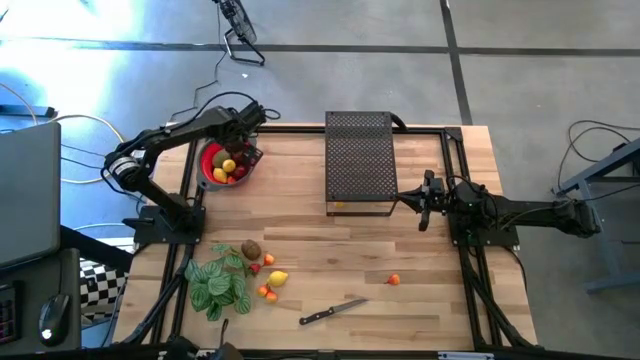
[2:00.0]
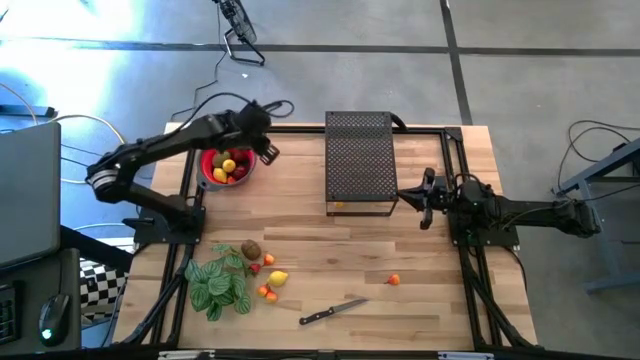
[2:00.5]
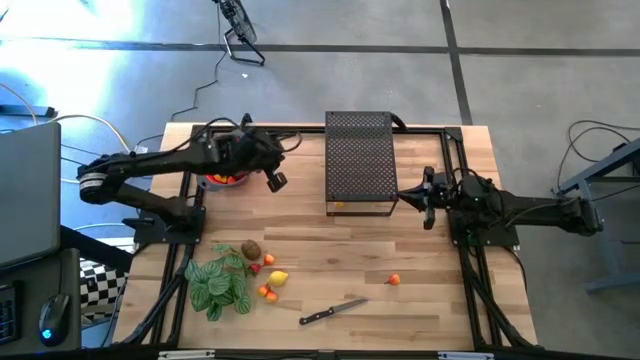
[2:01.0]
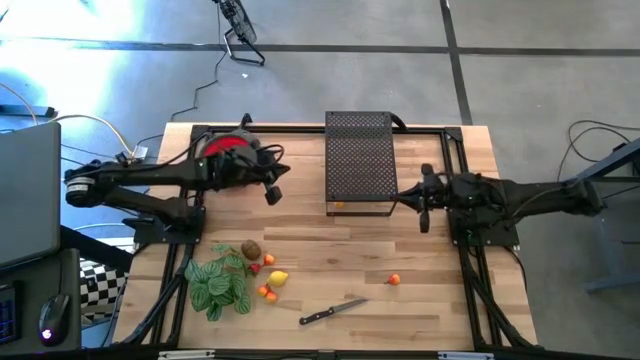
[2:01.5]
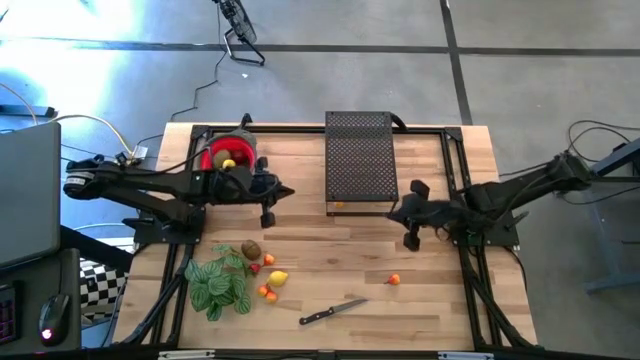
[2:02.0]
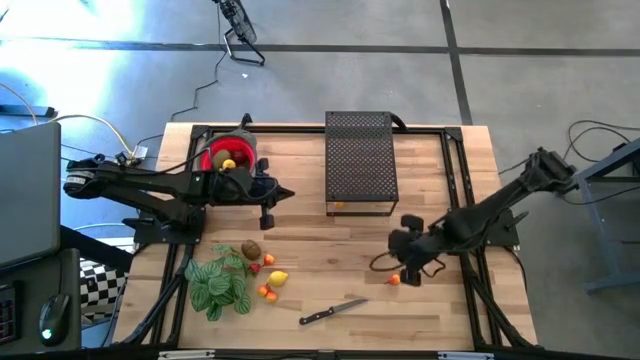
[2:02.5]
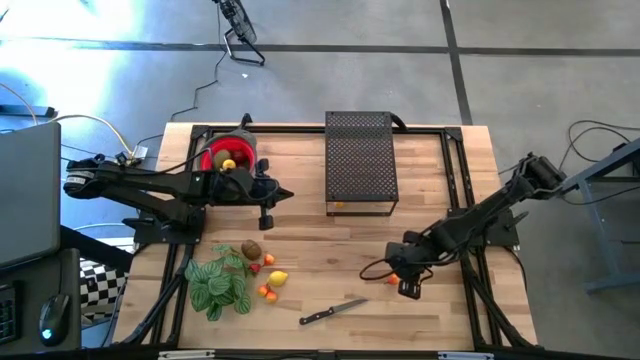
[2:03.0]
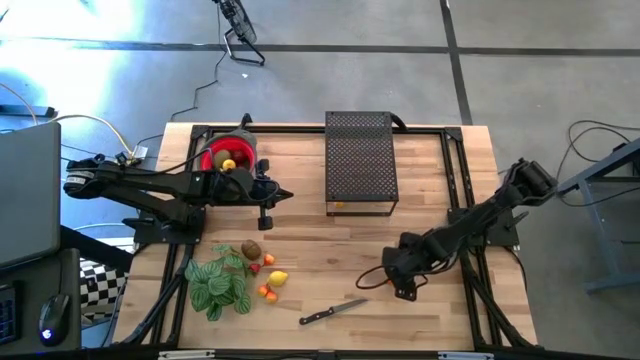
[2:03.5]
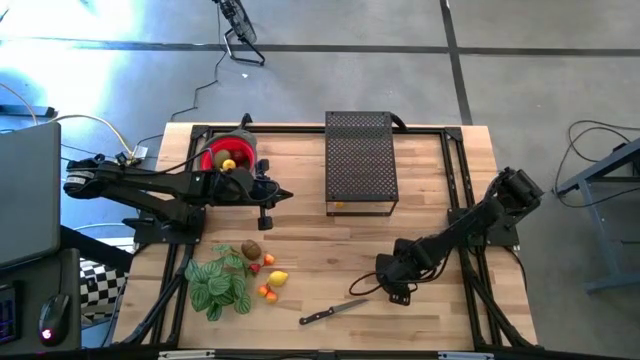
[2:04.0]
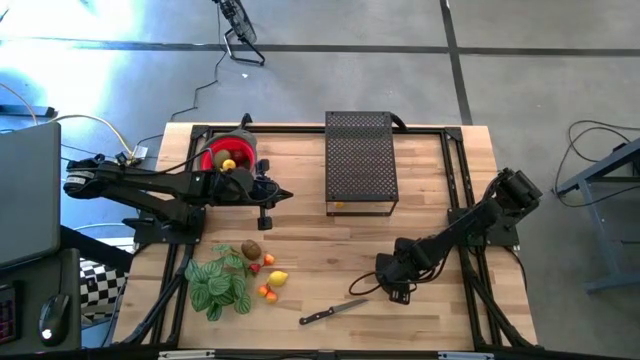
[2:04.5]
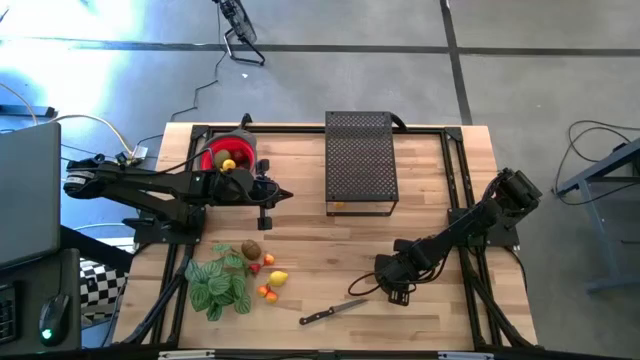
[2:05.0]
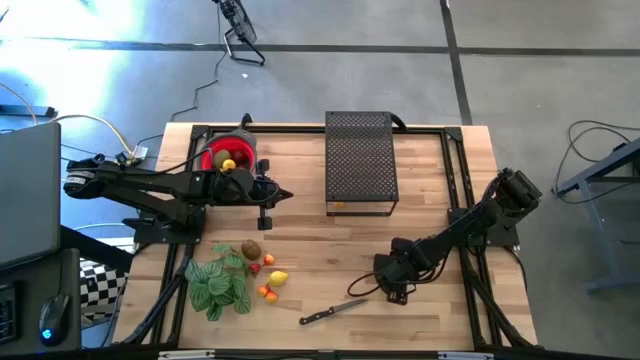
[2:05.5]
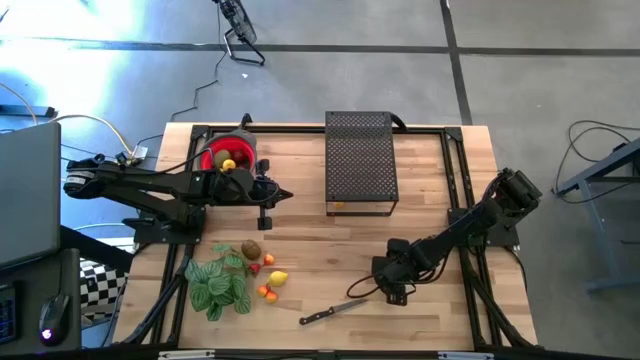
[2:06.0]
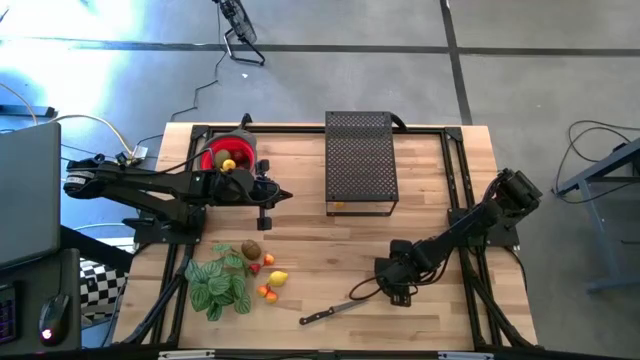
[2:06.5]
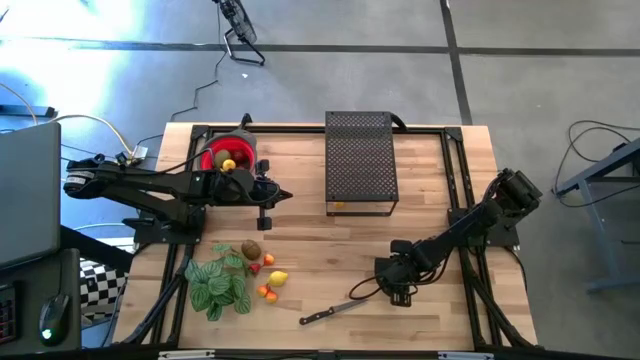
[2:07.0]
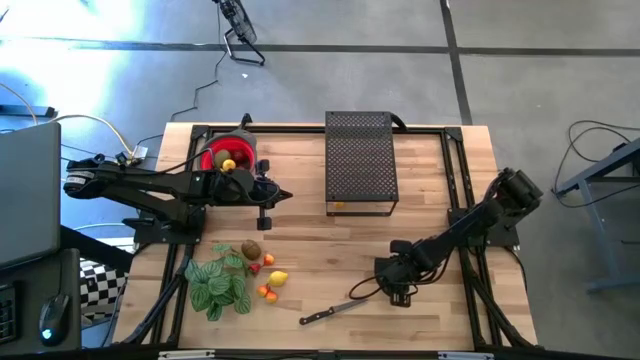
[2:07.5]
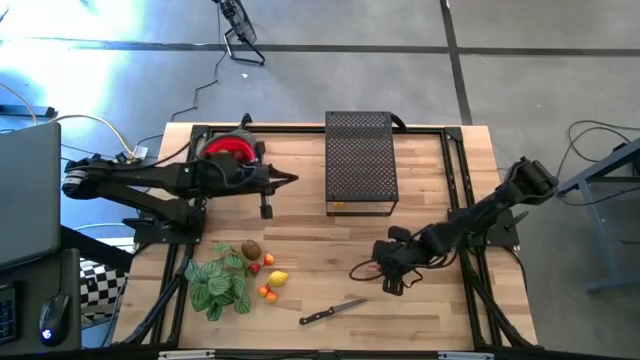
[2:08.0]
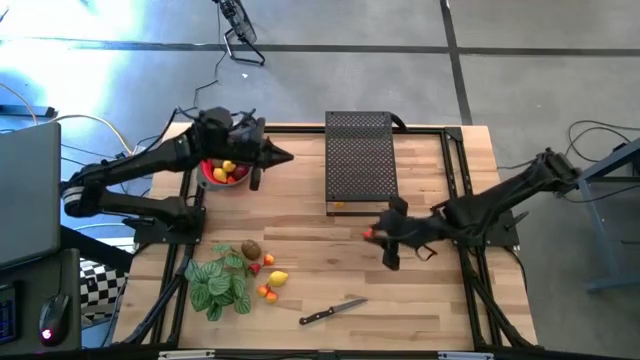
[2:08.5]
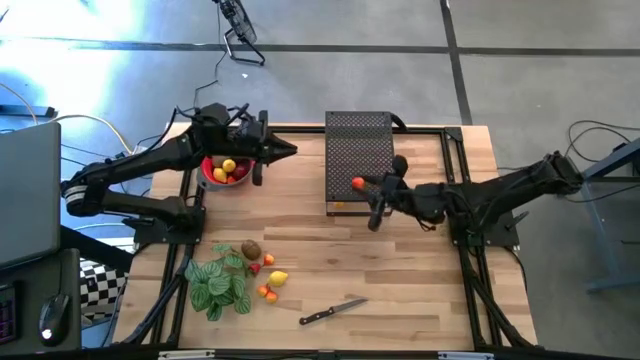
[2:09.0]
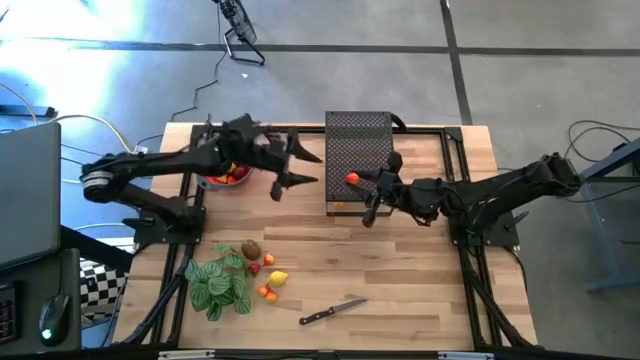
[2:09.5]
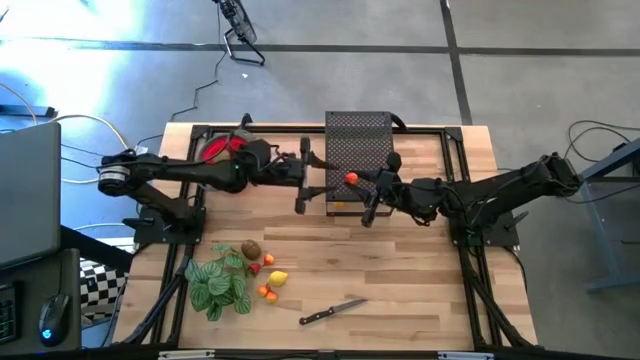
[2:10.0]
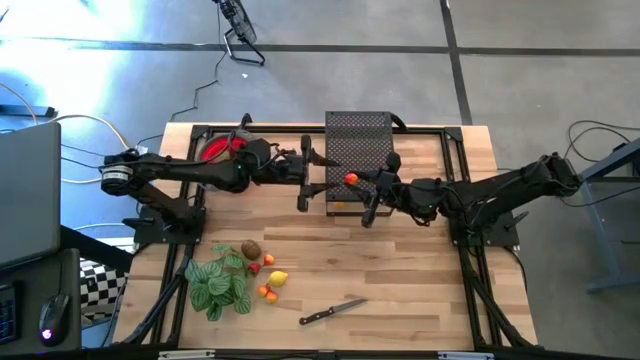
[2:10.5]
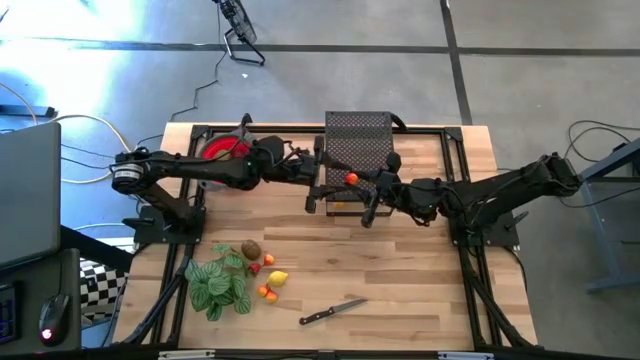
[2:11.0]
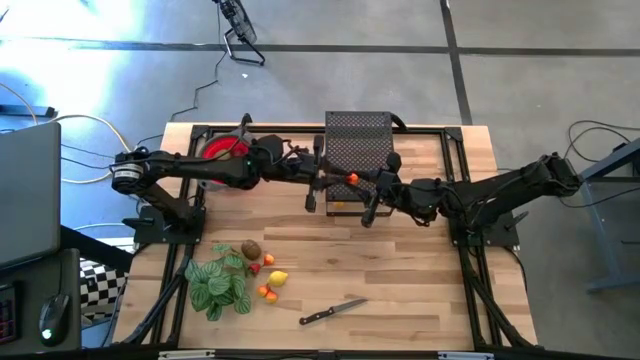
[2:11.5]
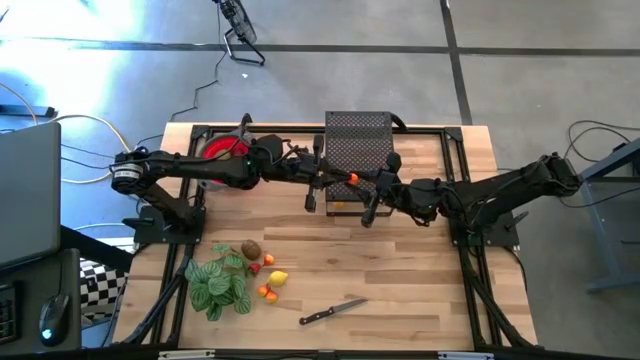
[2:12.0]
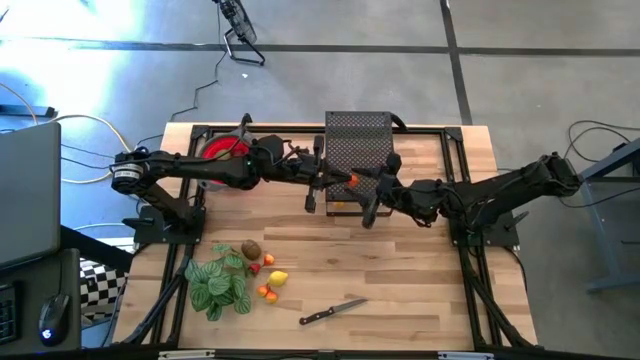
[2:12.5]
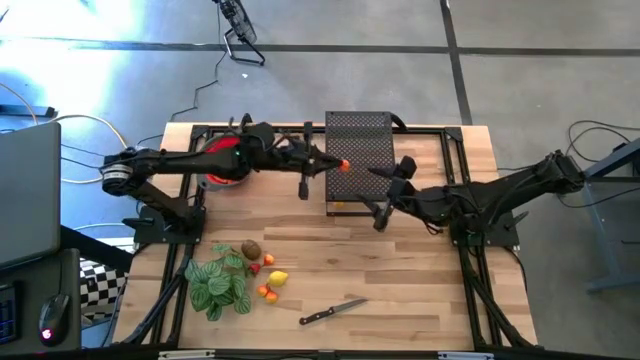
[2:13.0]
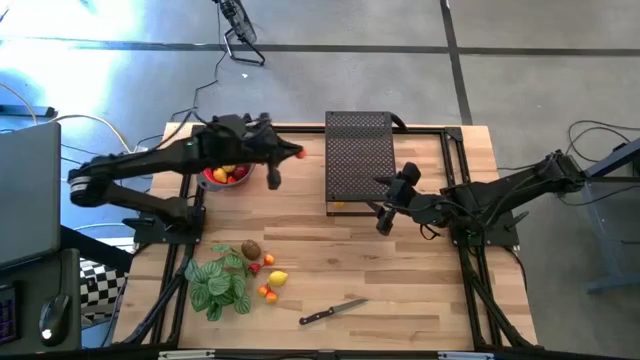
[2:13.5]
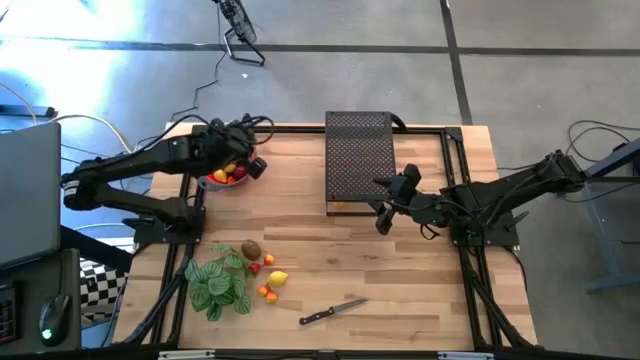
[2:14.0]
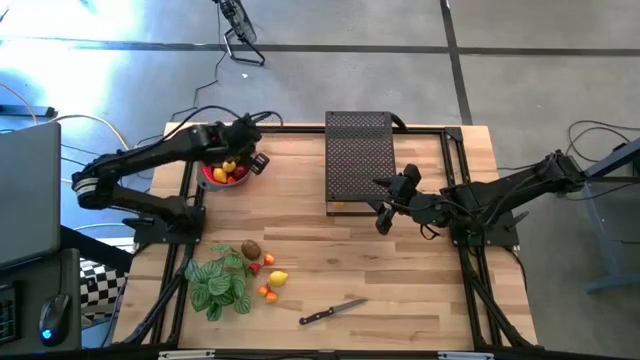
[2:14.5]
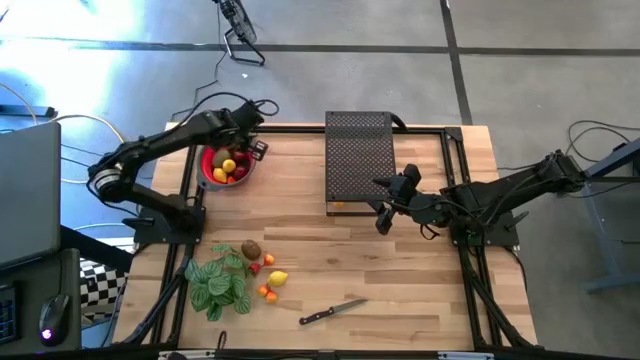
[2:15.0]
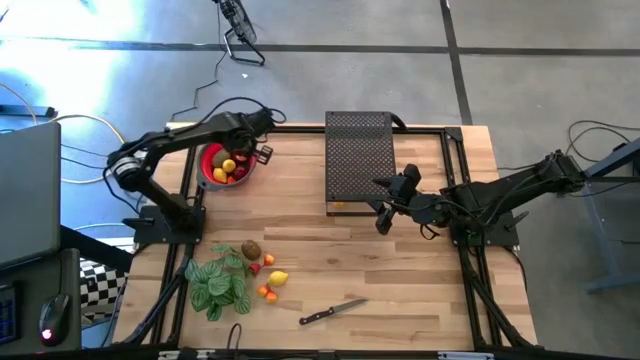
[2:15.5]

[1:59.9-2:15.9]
Task: Pick & Place Fruit
Put the orange pear into the strainer bowl

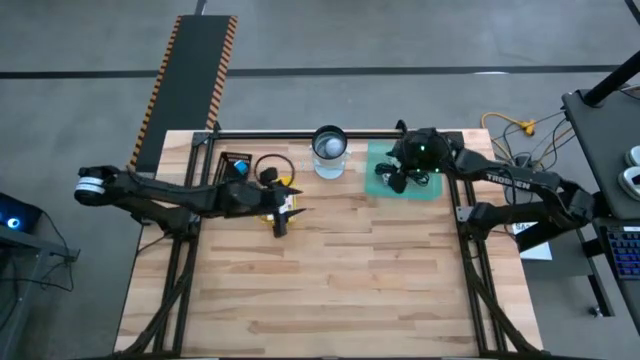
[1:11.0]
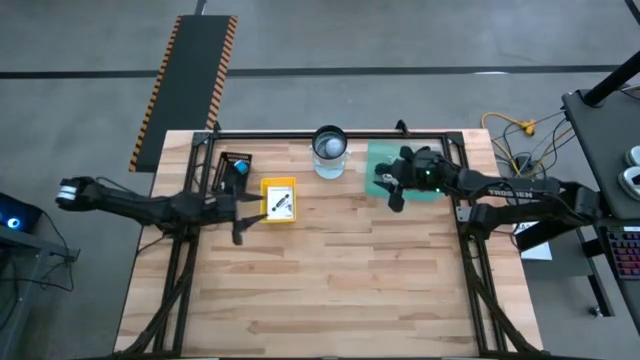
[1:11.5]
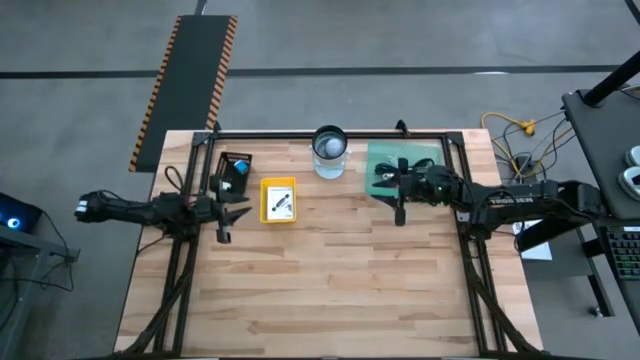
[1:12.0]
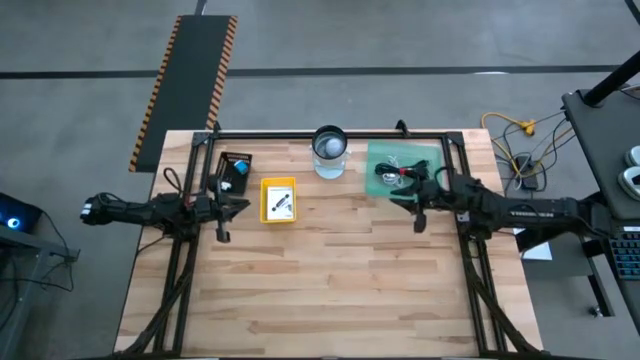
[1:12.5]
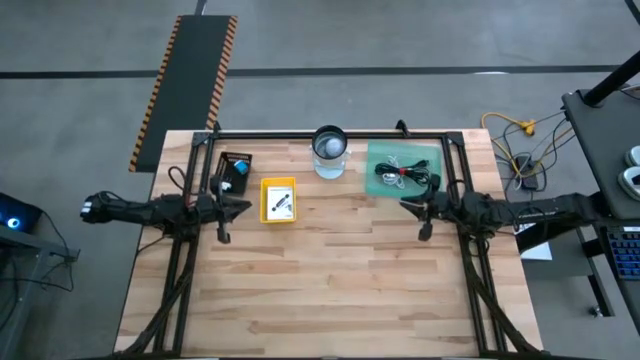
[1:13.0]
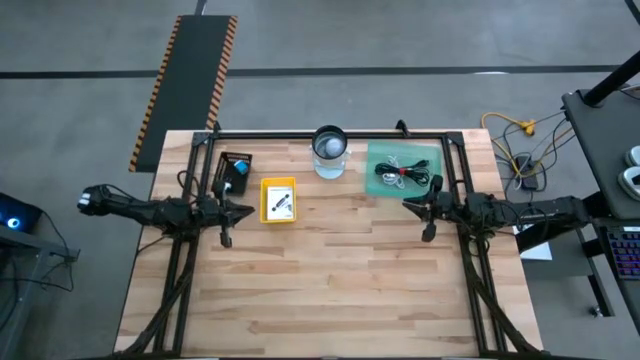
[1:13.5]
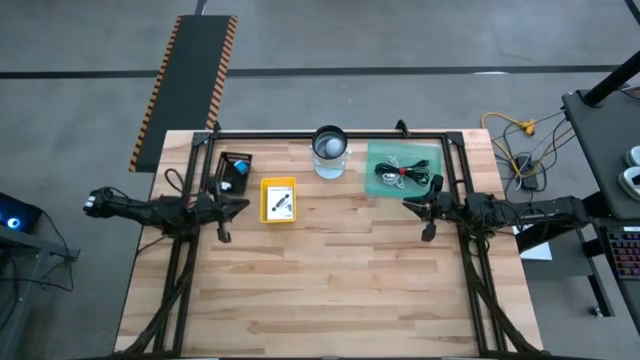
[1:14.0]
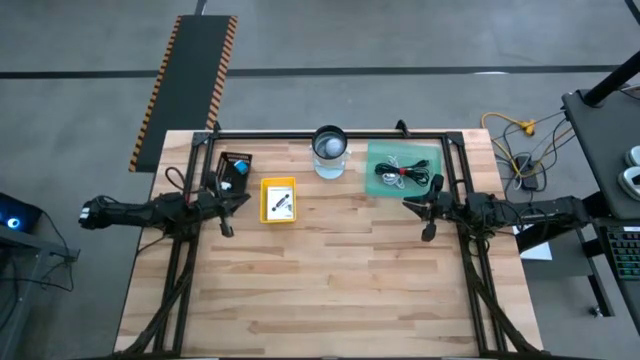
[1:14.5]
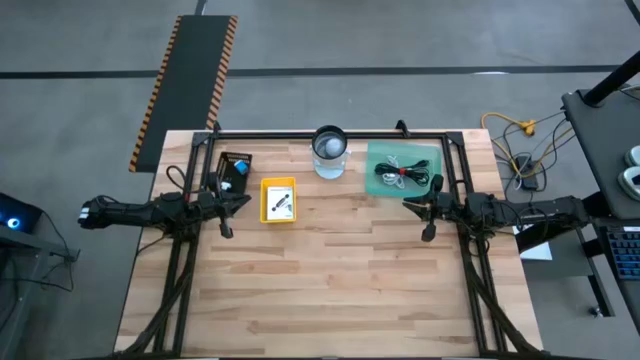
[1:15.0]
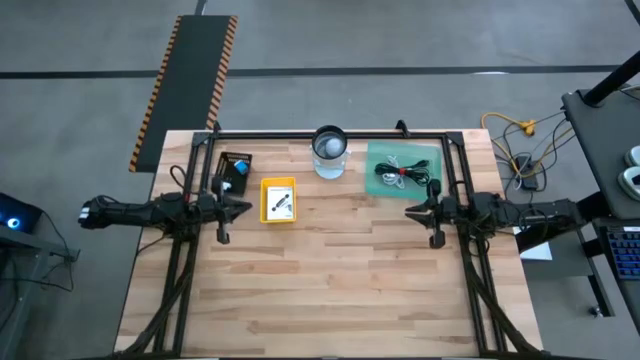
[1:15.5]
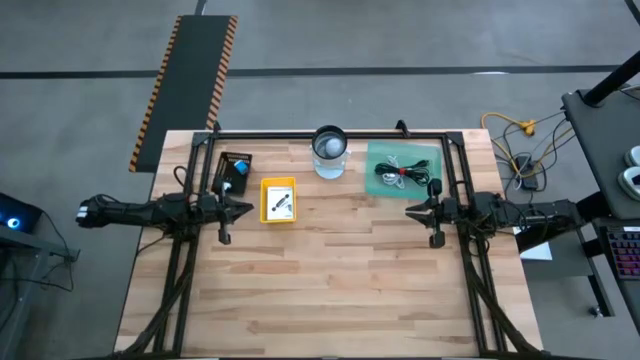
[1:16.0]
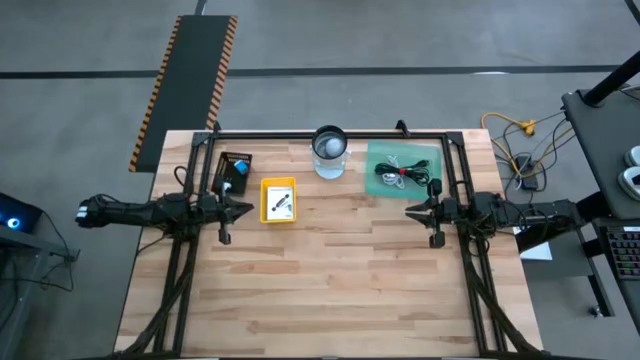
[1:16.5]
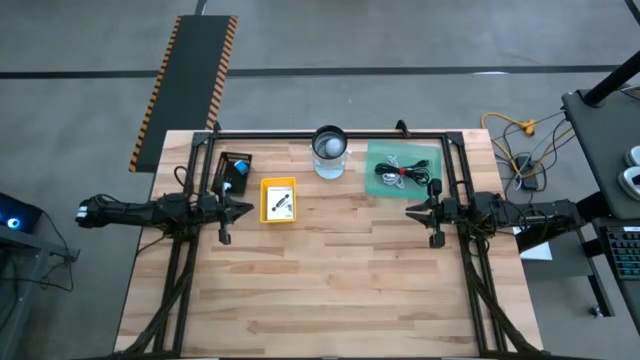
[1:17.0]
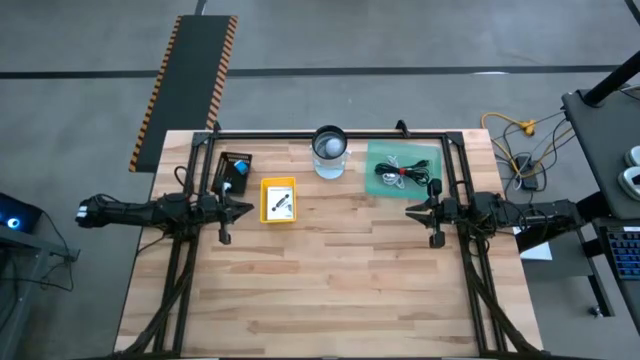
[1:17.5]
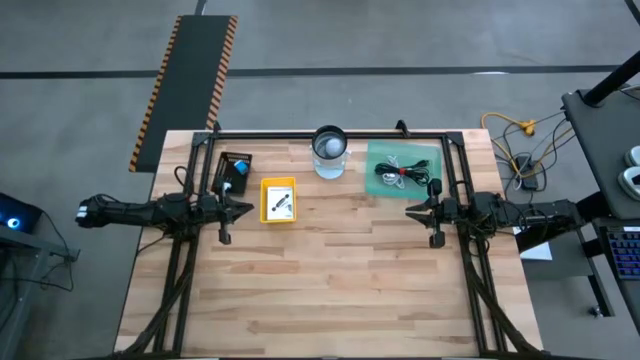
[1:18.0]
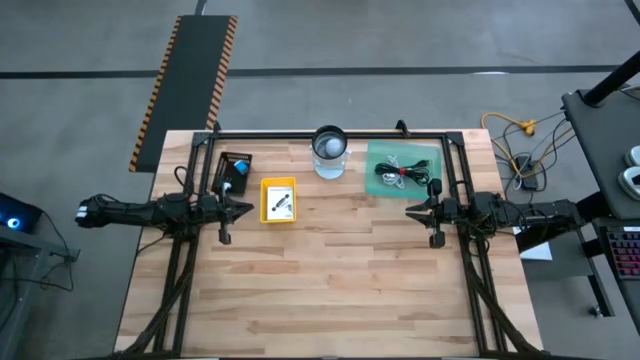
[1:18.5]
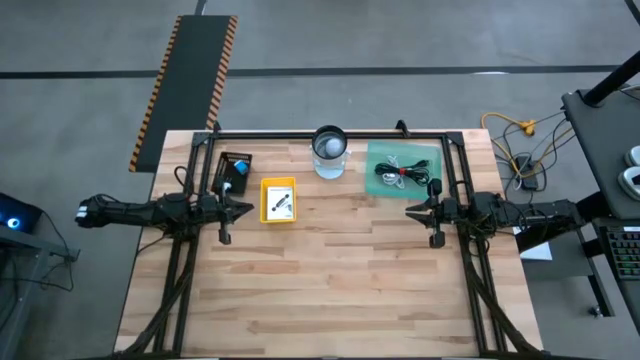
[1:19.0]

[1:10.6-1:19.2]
Task: Pick and place items into bin
Return to Home Position
